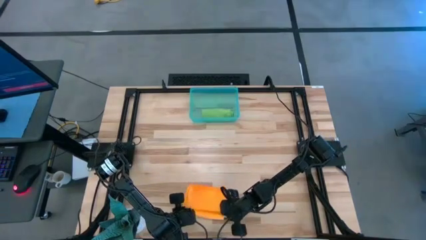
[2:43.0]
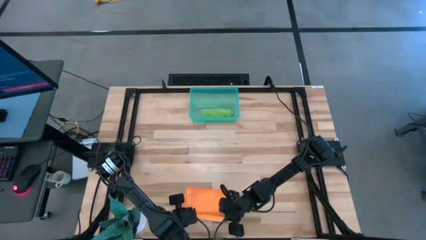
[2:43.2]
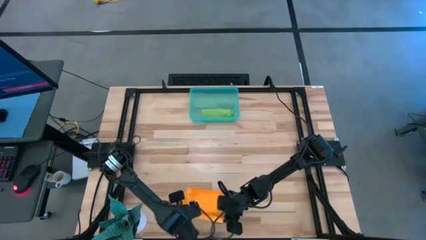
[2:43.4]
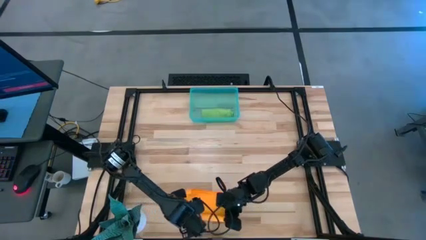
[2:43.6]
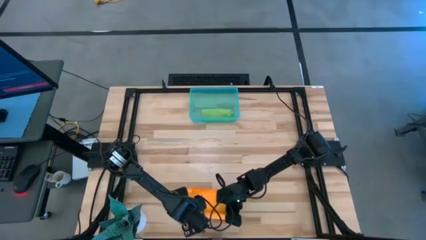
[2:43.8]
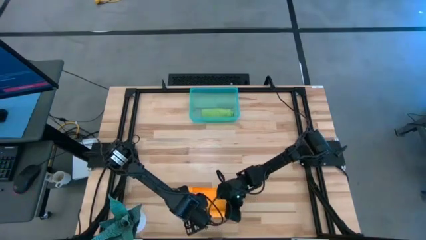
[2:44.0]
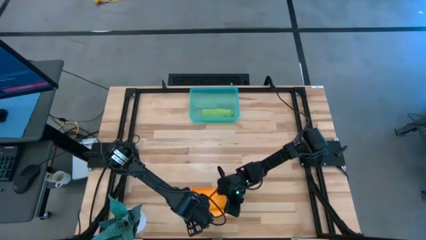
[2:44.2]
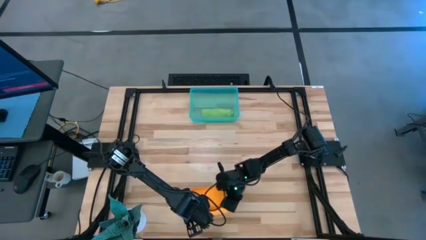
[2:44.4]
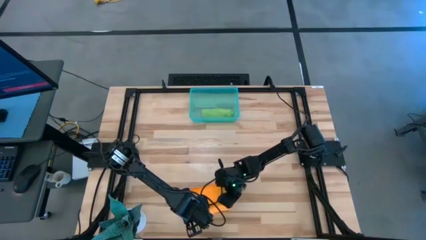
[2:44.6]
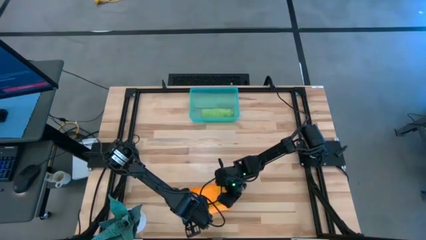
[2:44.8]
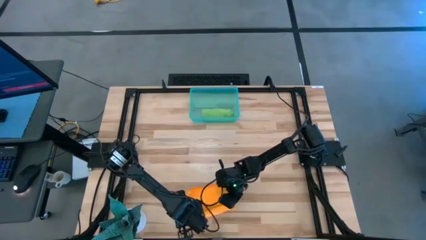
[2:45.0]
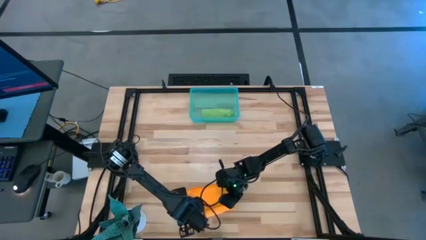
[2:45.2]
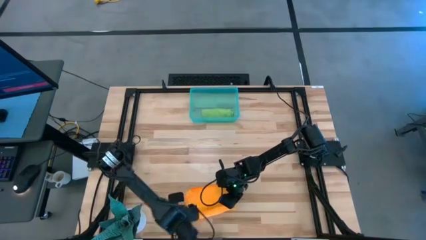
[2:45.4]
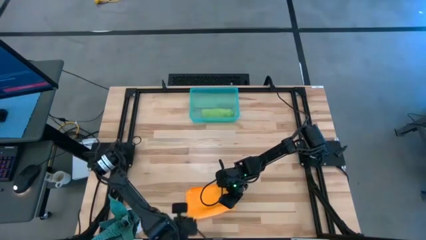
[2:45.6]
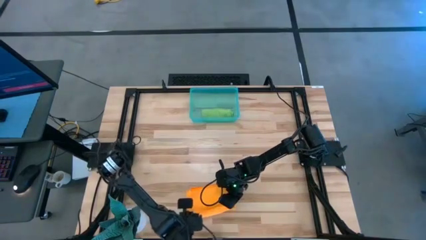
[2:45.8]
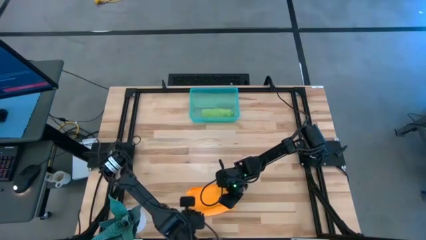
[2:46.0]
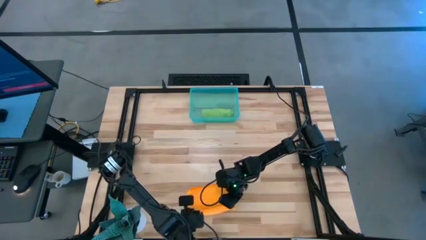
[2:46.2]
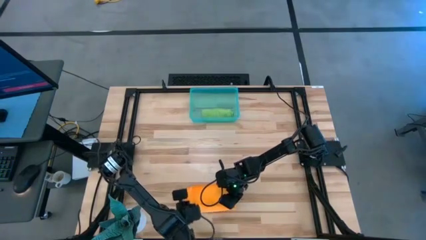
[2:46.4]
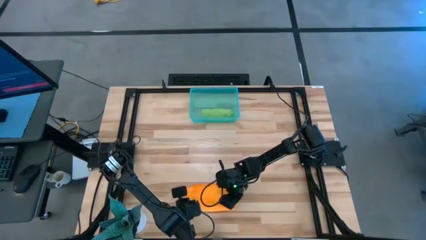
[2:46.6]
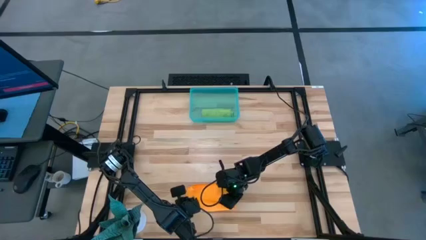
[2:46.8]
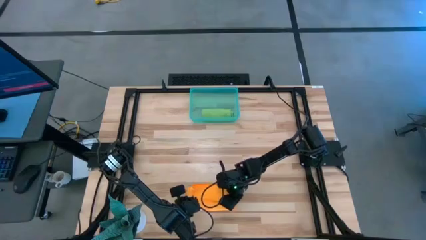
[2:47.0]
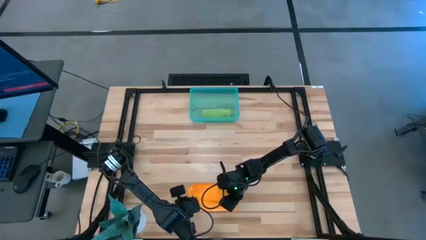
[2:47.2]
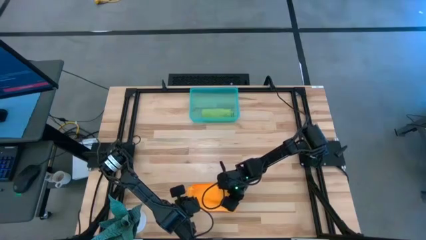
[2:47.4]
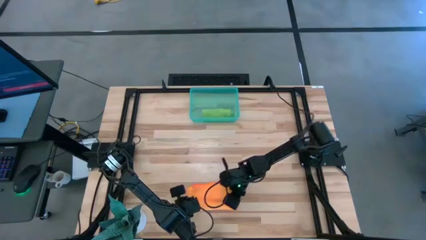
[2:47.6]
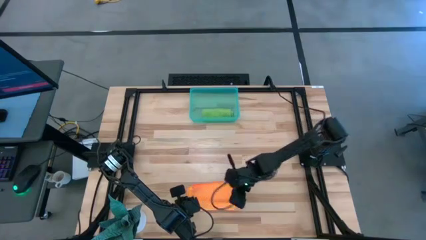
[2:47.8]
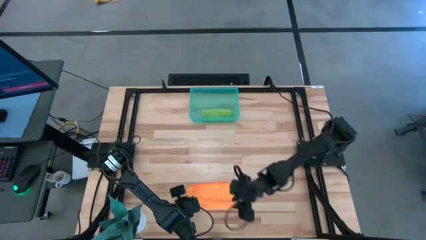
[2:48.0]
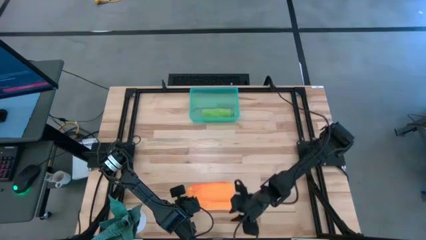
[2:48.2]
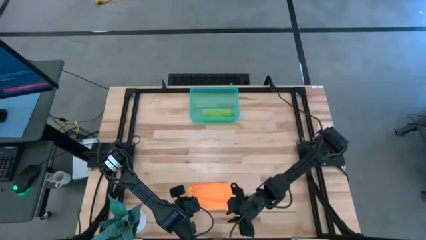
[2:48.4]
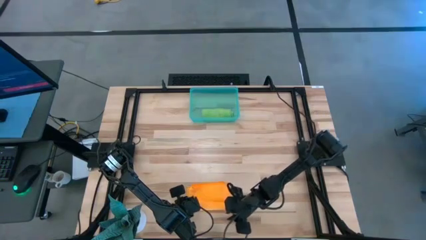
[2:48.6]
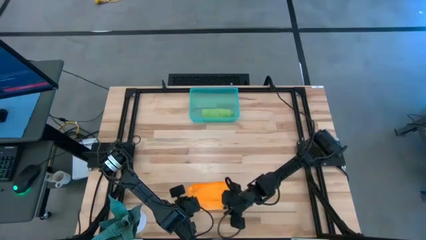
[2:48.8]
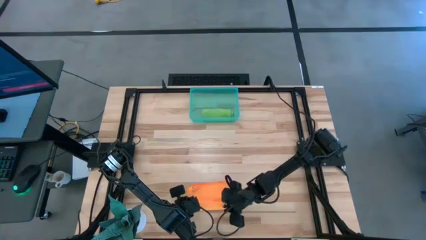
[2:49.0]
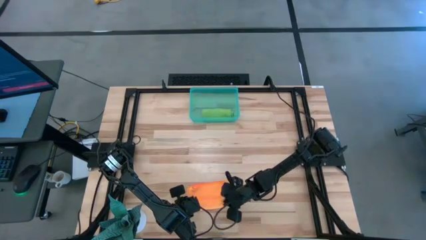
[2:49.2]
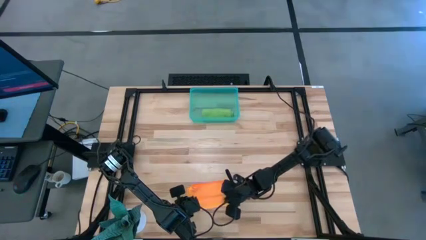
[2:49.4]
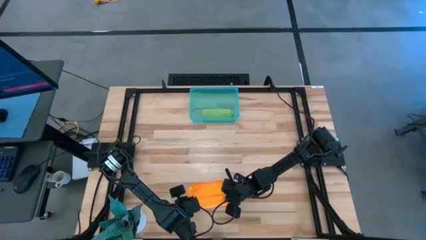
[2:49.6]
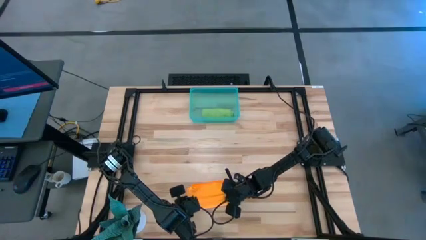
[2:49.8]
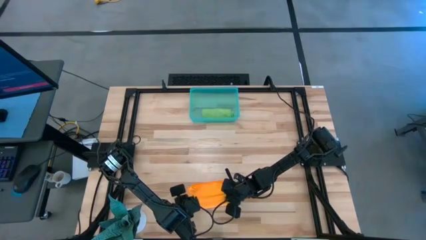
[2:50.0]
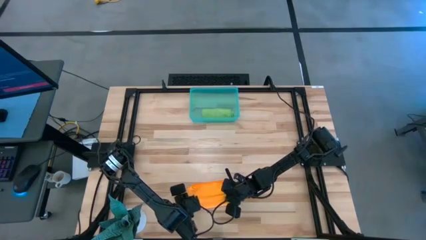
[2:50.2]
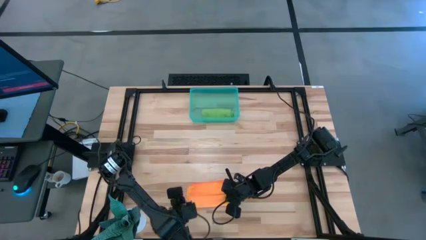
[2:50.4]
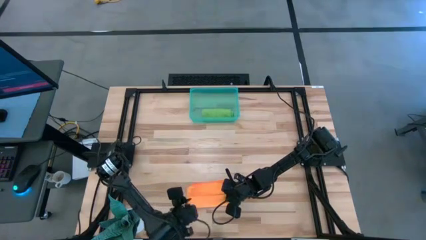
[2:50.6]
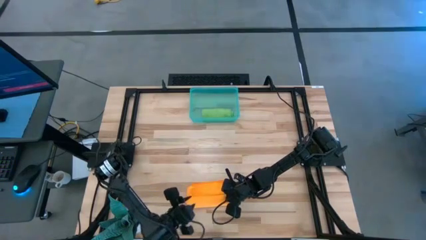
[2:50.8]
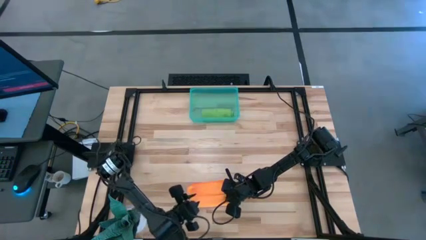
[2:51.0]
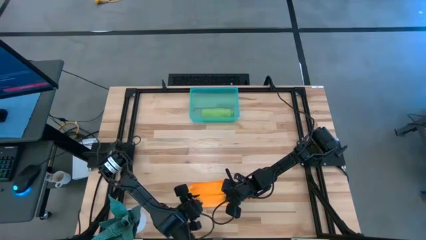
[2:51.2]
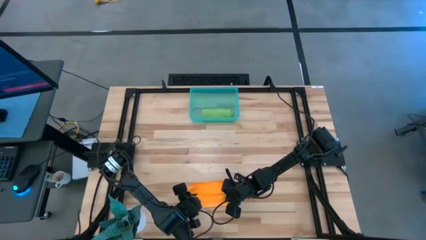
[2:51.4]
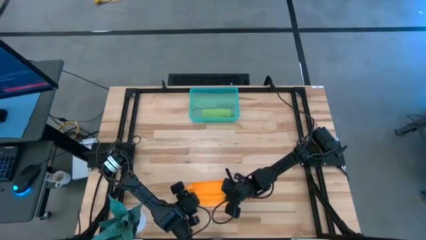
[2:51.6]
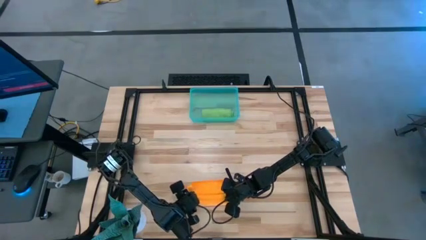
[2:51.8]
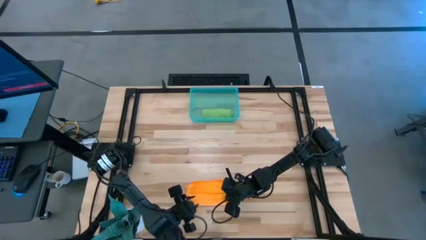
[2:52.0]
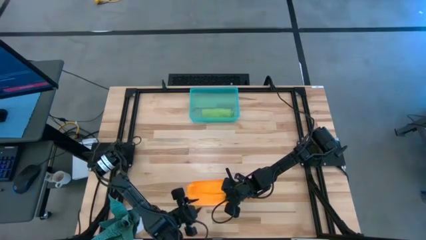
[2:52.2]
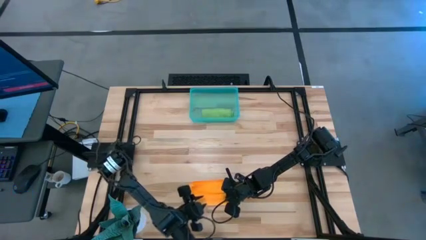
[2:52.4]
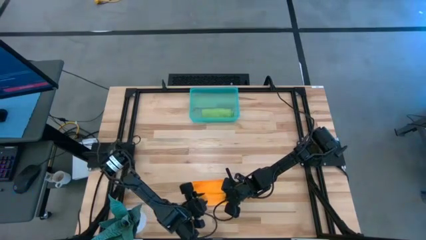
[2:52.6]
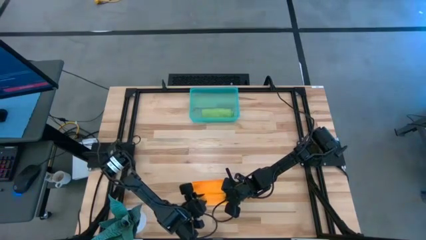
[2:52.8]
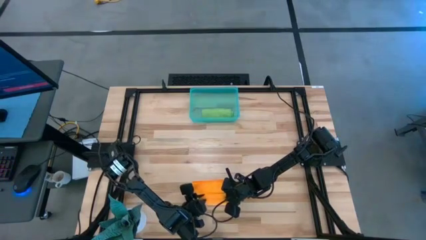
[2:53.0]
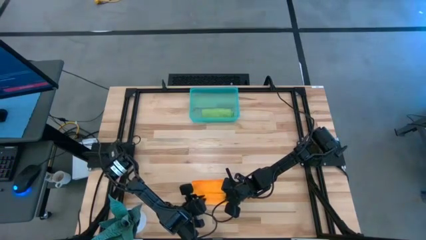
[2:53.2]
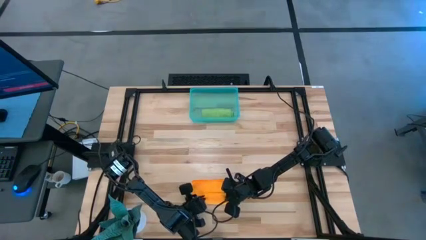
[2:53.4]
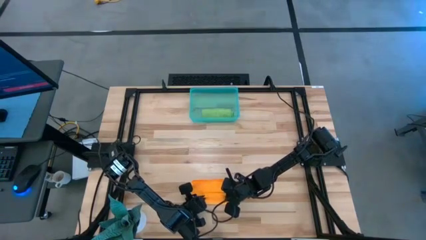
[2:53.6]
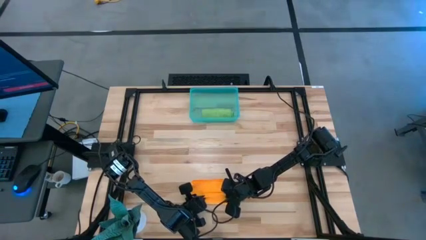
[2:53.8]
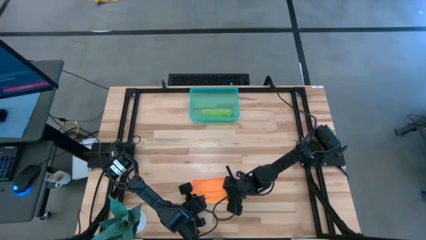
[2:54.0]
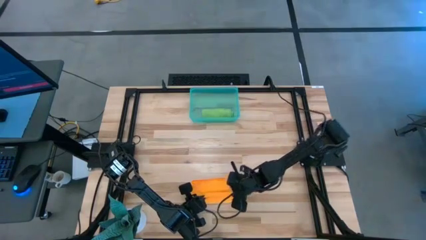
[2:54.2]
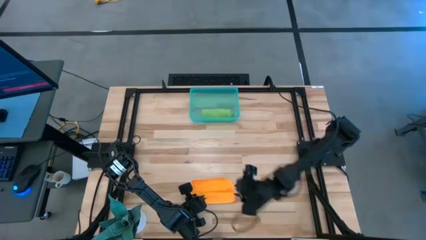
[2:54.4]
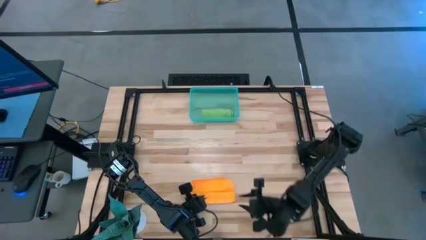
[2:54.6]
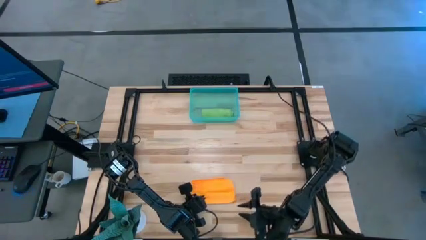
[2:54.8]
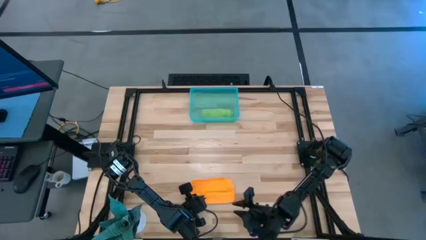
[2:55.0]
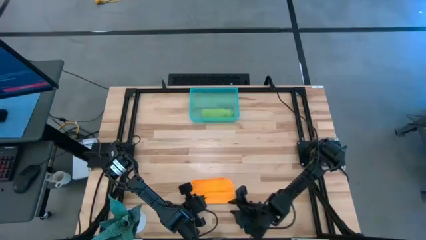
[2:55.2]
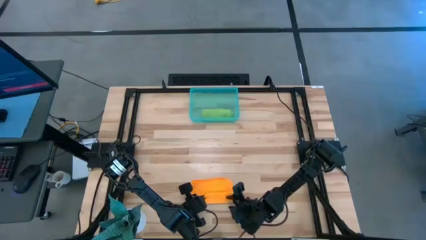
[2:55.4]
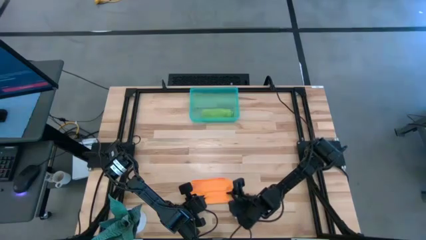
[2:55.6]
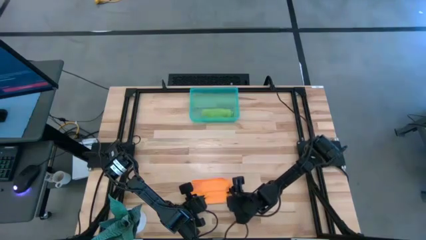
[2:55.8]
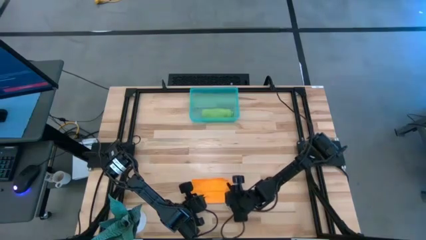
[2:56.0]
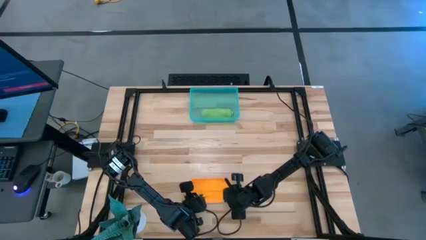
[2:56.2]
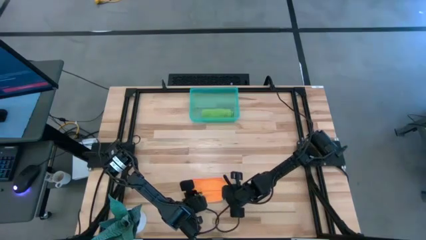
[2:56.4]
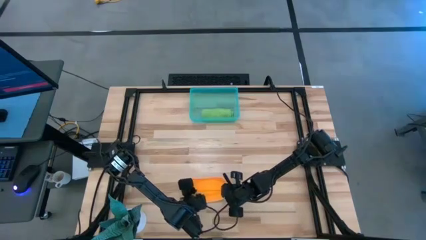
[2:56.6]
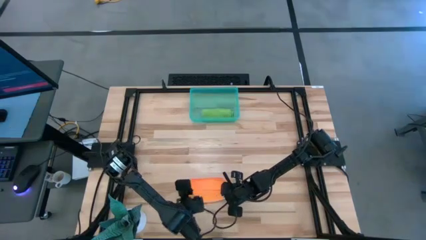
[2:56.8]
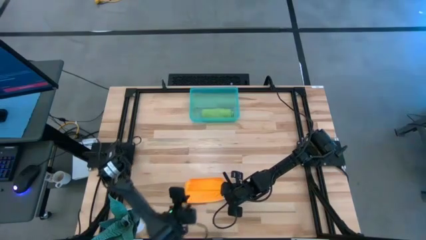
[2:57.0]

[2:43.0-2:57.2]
Task: Roll microfiber towels into tight, uniform cylinder then place into a basket
Roll the orange towel
